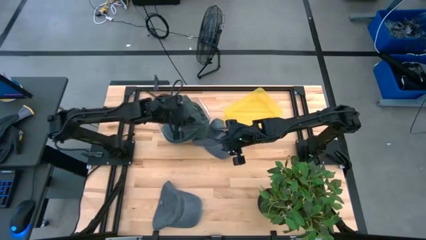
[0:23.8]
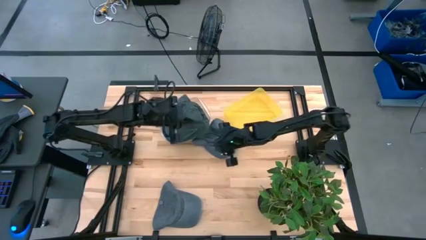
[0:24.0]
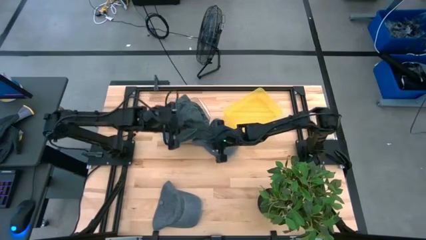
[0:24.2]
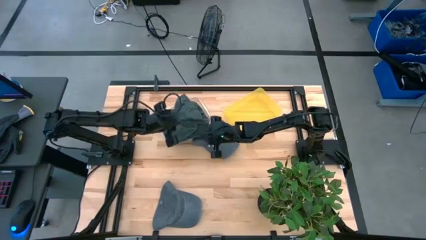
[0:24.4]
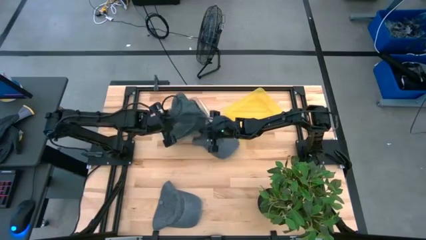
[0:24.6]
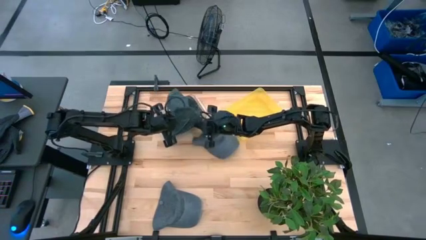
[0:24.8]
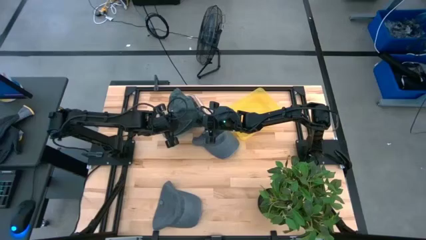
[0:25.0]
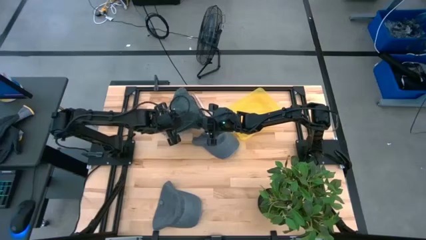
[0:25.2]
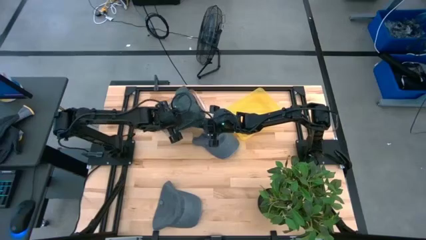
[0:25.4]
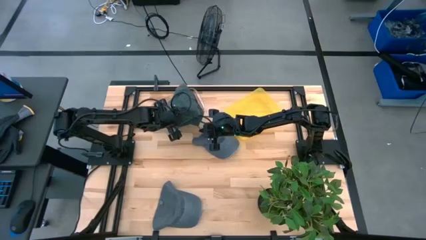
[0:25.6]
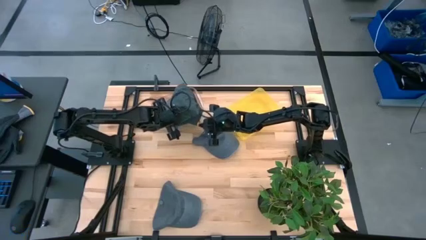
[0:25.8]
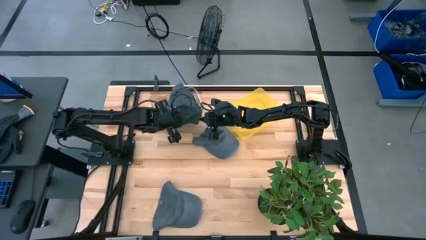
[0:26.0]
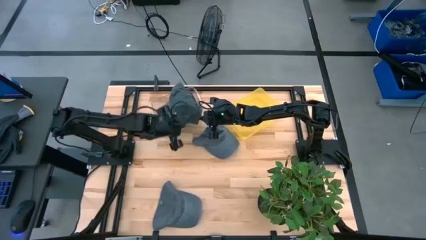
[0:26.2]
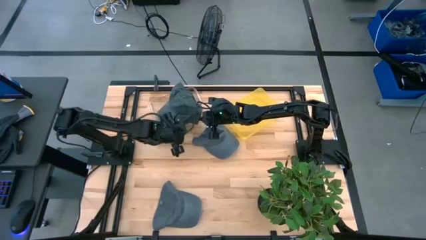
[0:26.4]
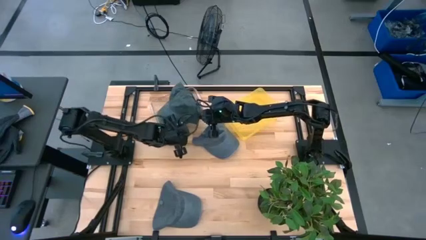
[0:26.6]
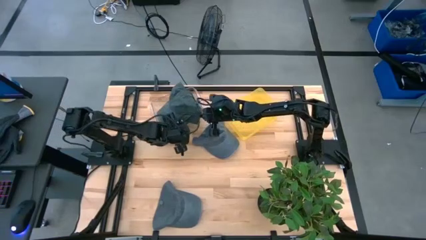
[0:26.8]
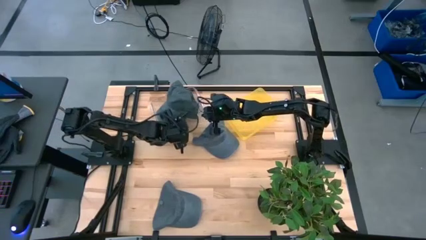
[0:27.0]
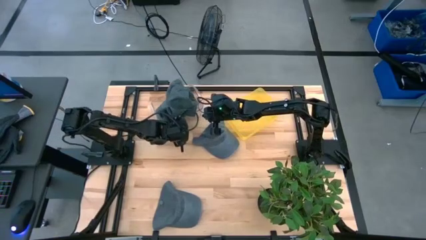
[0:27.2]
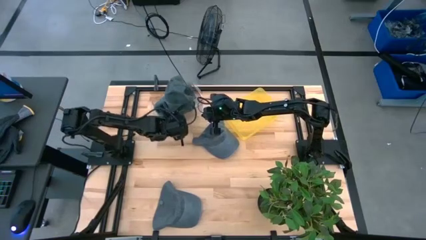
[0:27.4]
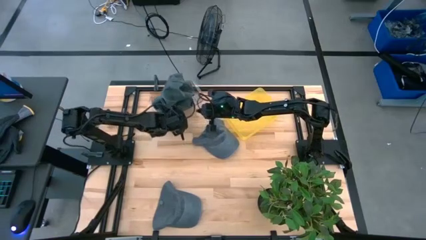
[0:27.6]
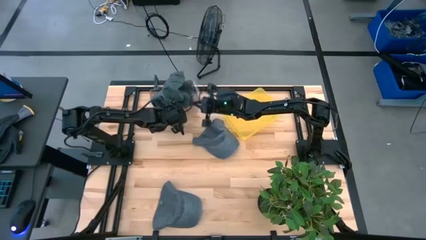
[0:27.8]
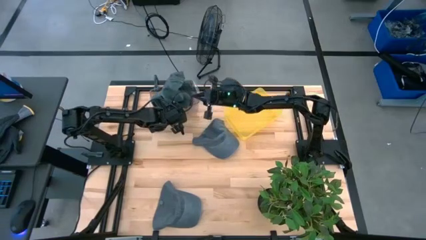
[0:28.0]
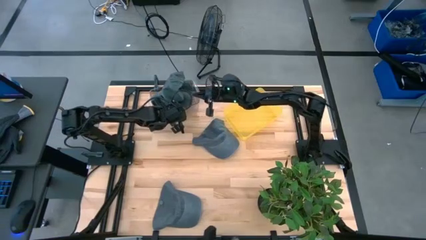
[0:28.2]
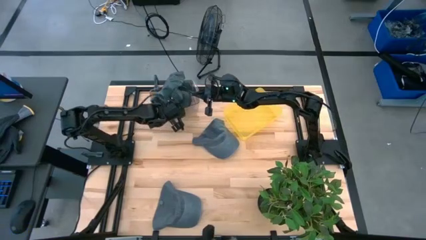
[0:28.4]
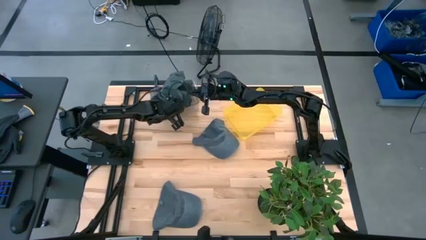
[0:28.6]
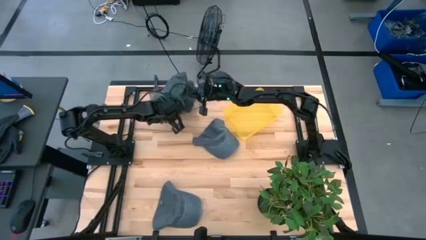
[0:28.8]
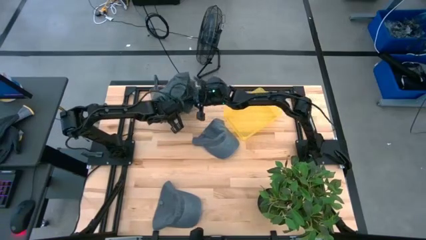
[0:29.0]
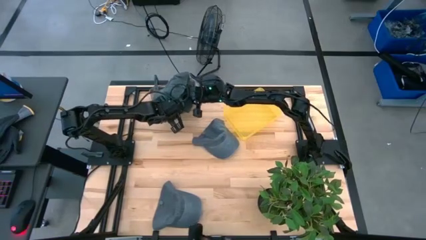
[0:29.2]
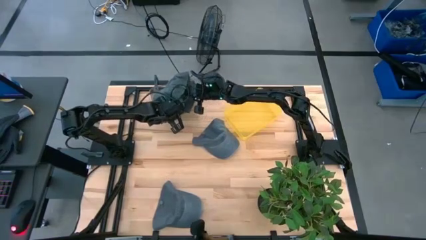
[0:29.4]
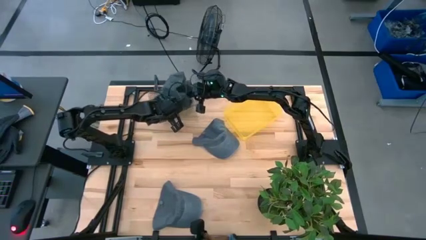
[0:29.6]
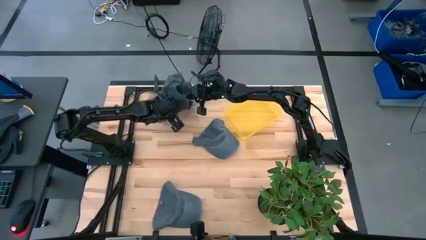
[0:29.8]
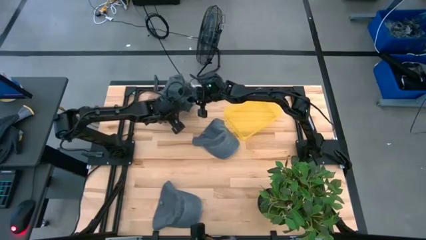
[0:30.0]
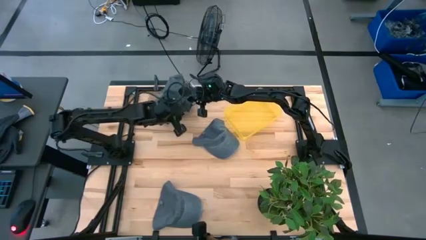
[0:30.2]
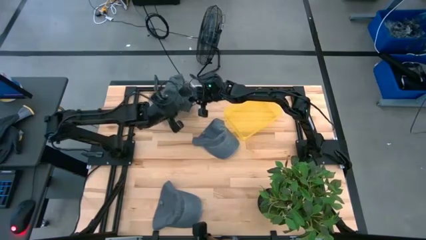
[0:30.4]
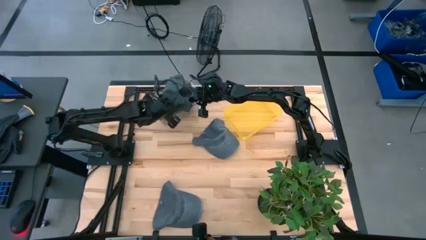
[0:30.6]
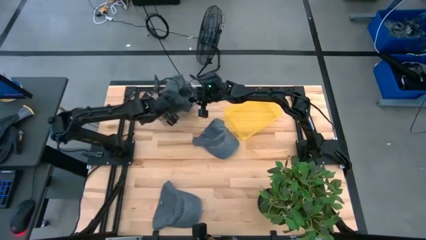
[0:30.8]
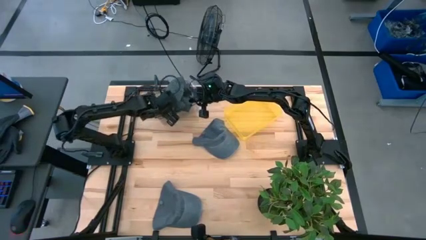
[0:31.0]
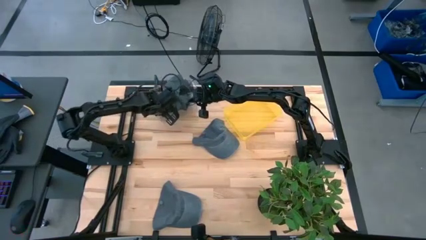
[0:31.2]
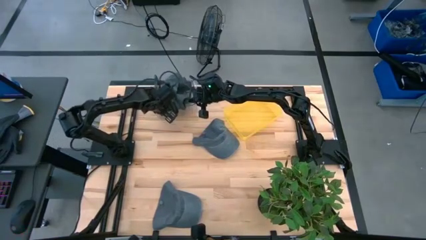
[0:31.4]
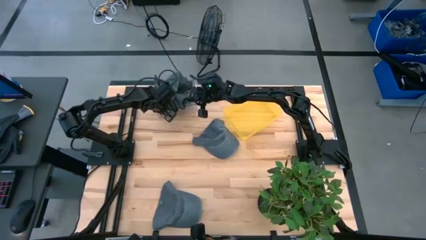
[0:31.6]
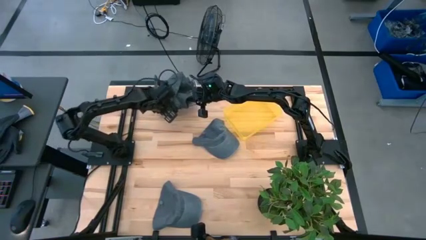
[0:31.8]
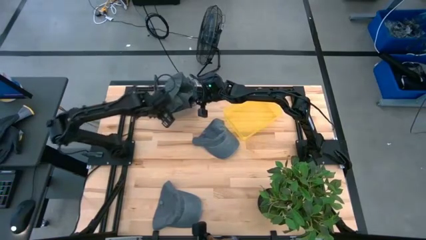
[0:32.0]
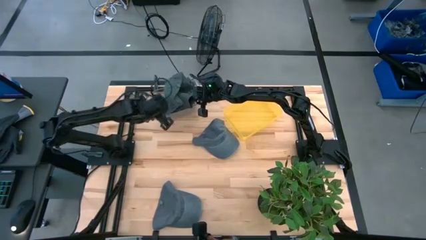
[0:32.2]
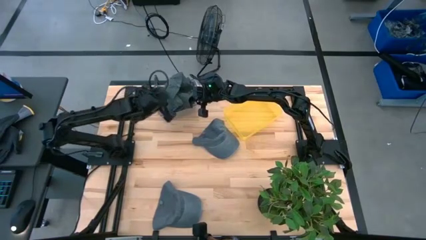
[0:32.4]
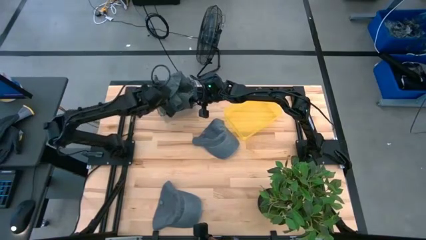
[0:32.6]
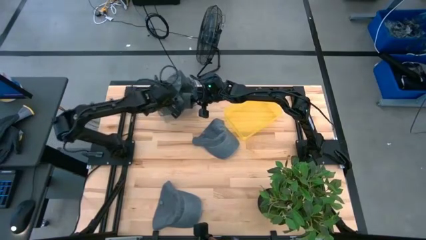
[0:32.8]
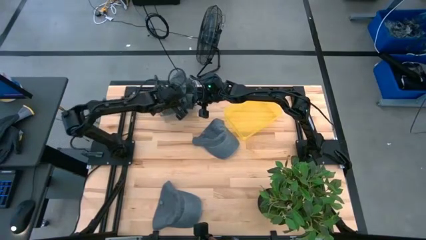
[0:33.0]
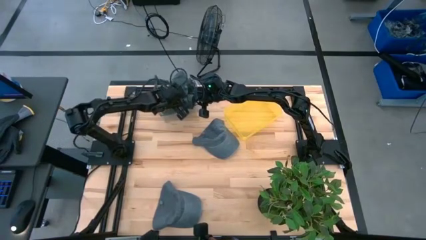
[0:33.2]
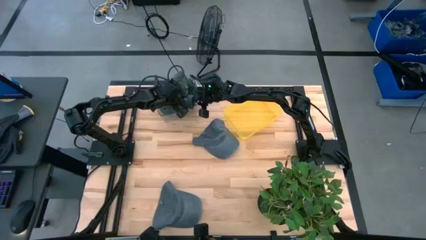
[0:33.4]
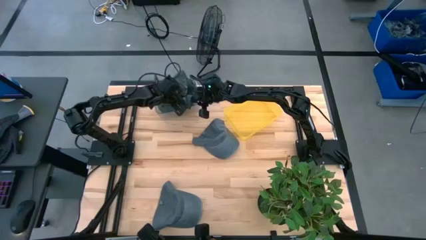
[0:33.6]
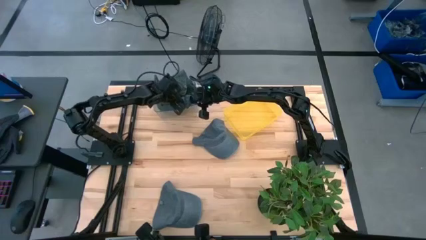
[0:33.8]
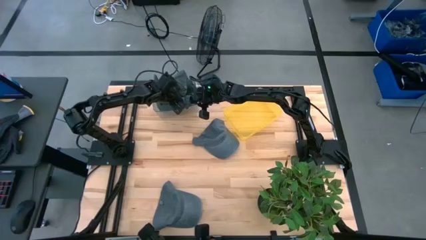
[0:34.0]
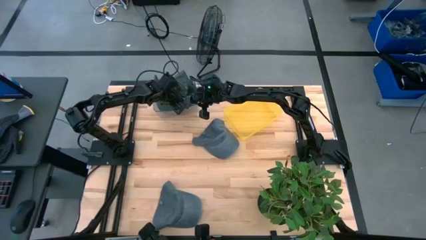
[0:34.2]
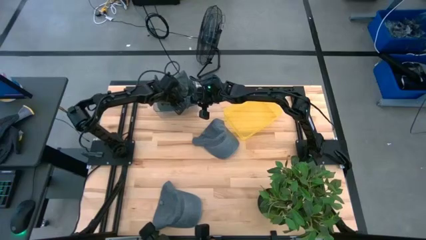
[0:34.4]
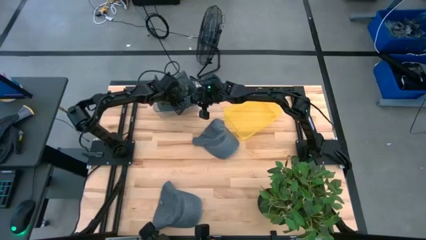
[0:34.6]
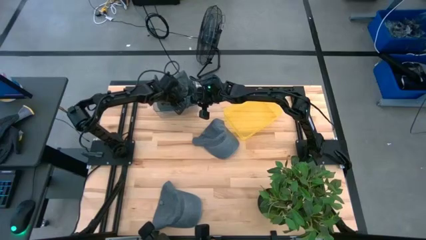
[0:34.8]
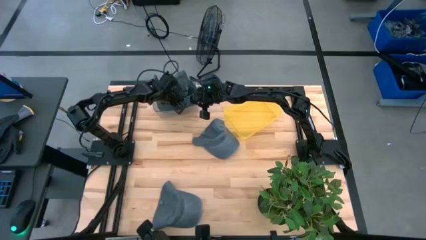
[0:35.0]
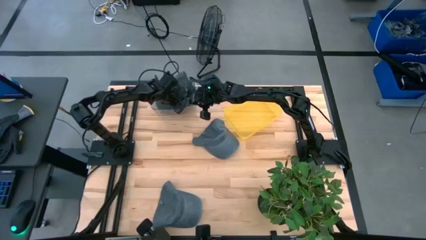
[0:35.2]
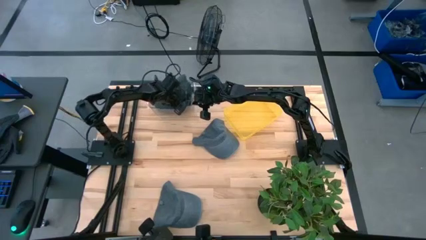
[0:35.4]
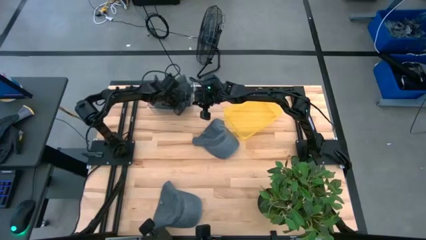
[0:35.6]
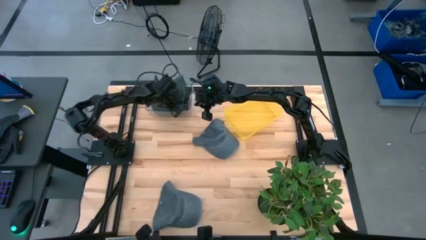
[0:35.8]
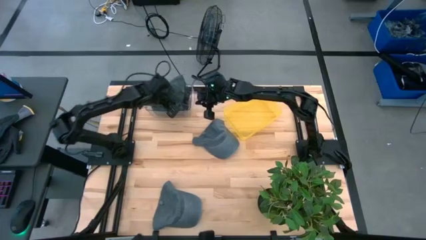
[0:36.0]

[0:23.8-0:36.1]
Task: Pick & Place hat
Put the black cap into the transparent bin

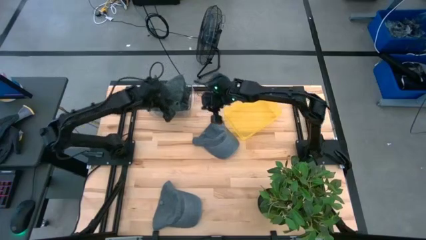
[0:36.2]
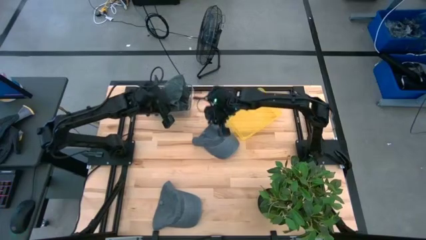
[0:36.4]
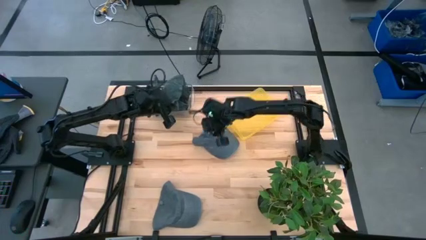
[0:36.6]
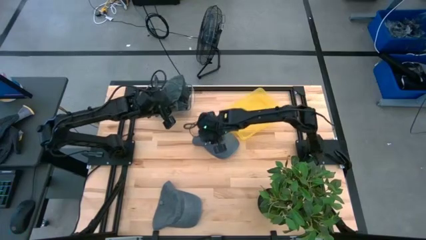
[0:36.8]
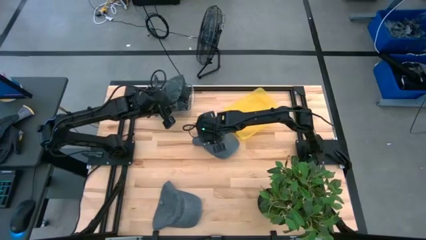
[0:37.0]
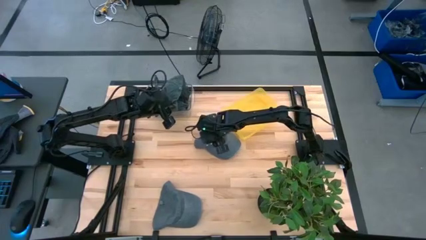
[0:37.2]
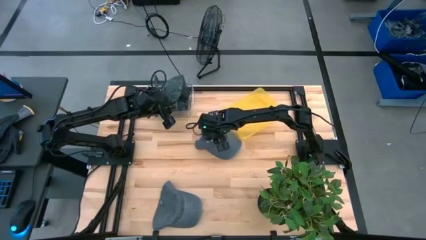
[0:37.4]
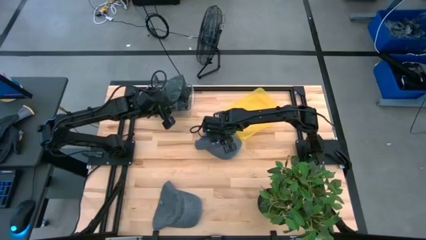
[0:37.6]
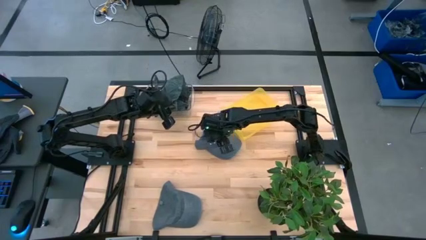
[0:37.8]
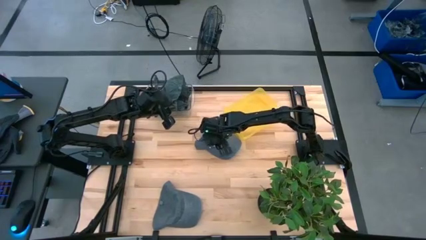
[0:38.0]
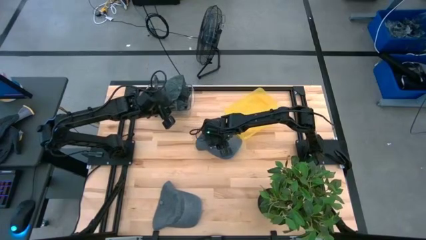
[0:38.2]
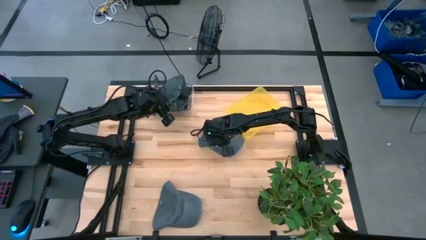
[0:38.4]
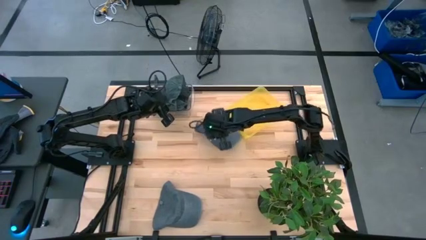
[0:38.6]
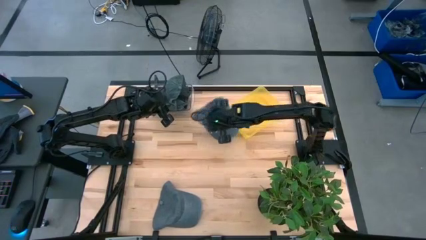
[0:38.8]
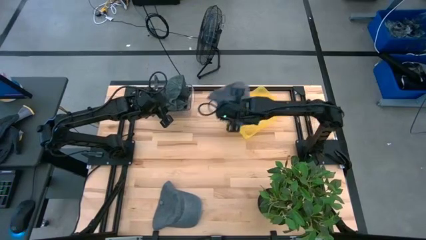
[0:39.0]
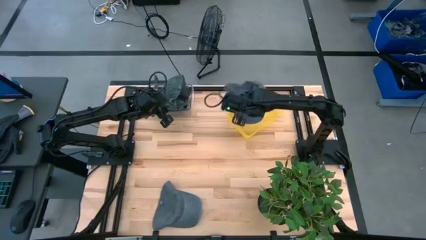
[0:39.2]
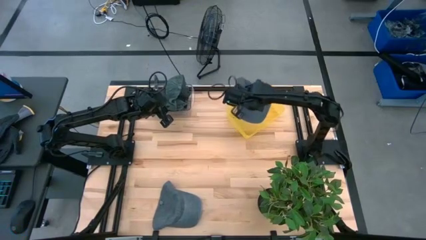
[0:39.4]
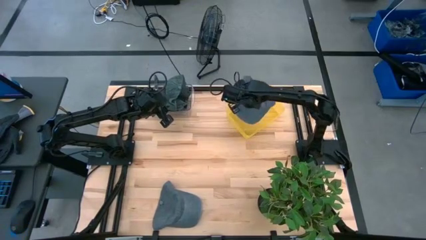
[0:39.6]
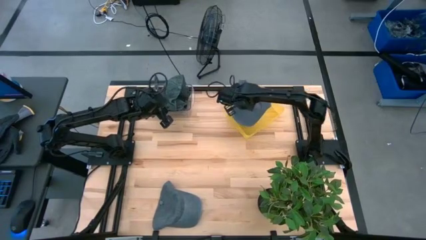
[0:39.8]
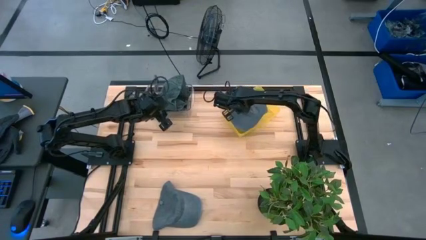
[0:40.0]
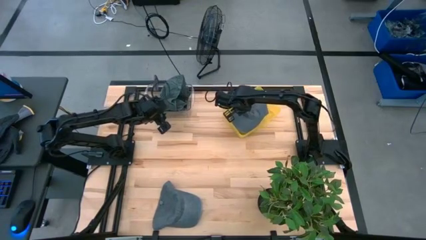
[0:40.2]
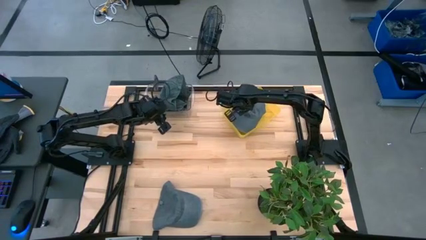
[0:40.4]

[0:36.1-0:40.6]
Put the top gray cap into the yellow bin
